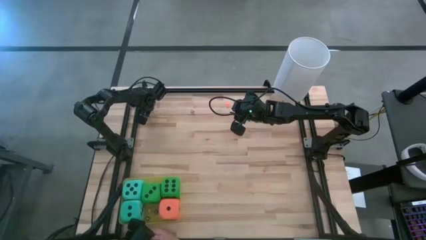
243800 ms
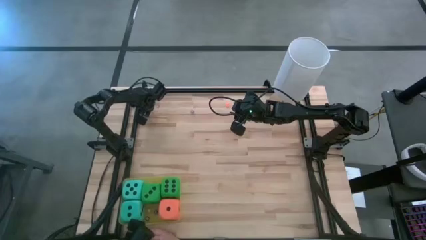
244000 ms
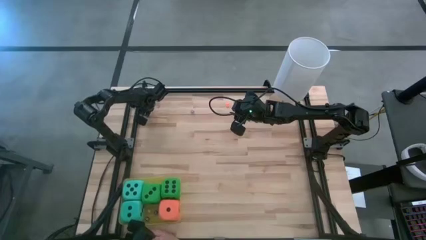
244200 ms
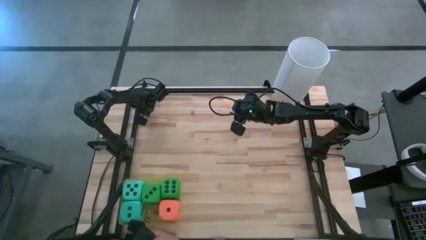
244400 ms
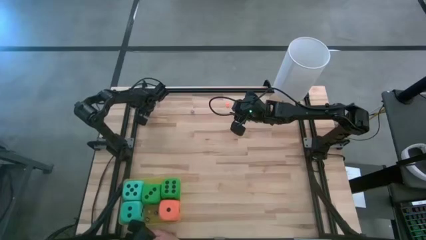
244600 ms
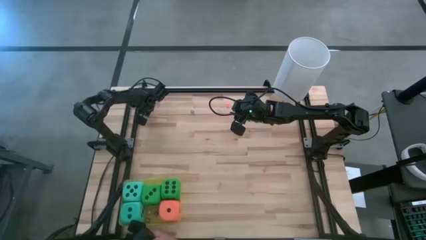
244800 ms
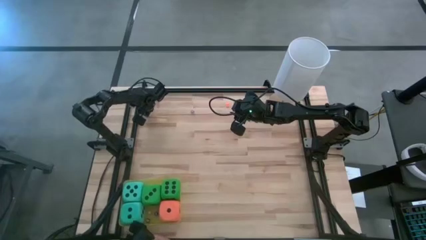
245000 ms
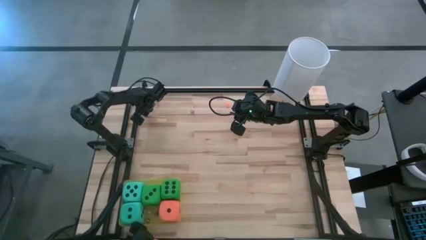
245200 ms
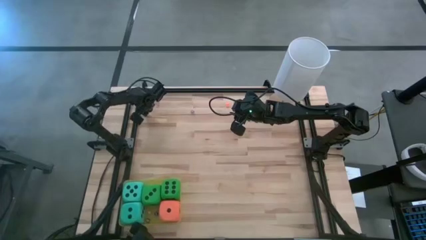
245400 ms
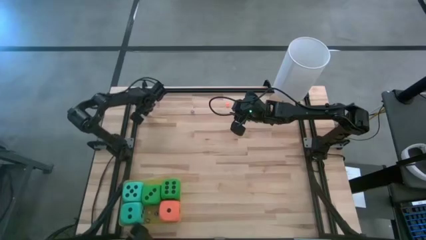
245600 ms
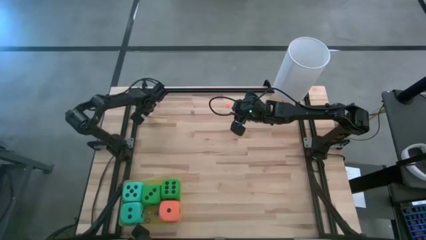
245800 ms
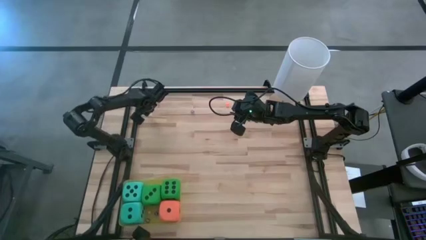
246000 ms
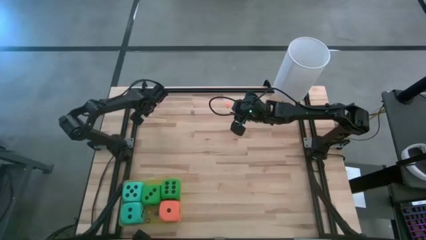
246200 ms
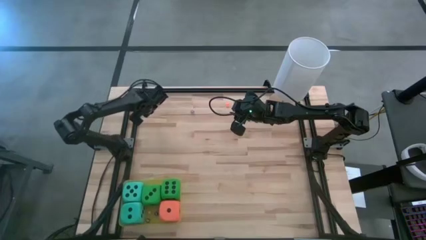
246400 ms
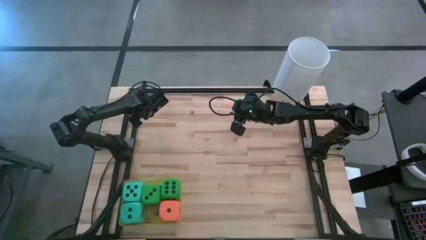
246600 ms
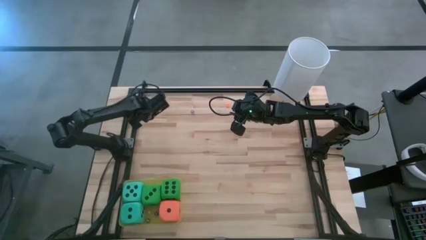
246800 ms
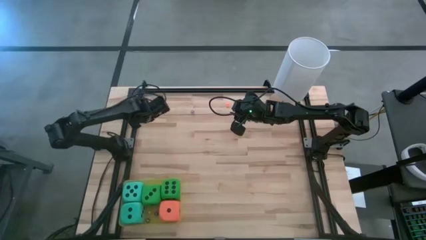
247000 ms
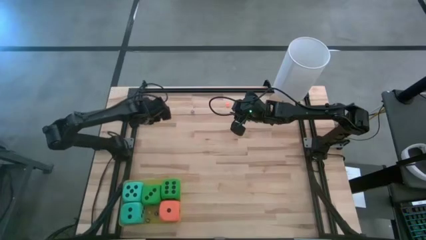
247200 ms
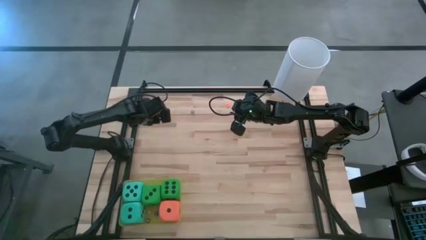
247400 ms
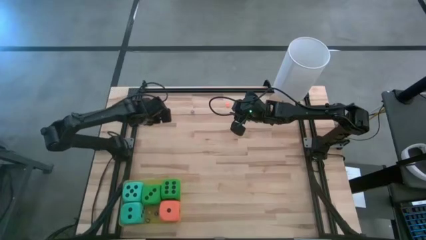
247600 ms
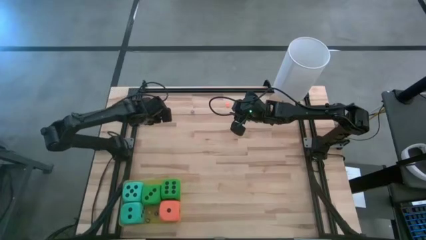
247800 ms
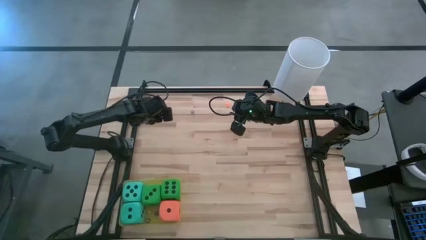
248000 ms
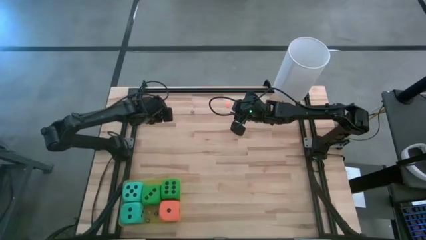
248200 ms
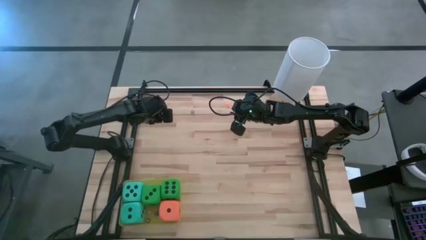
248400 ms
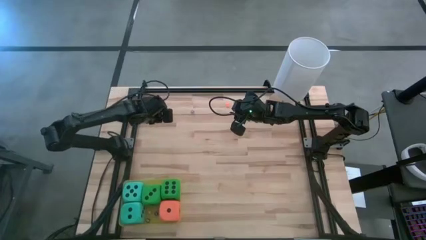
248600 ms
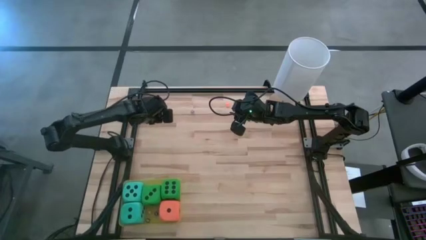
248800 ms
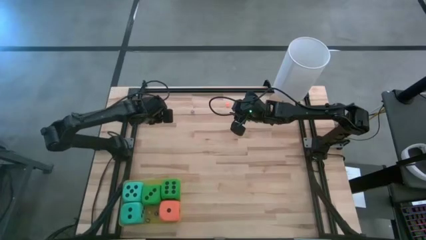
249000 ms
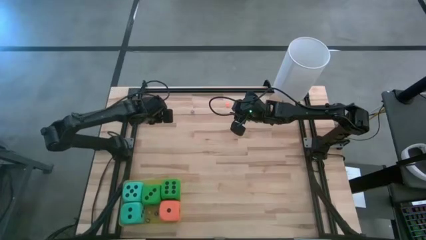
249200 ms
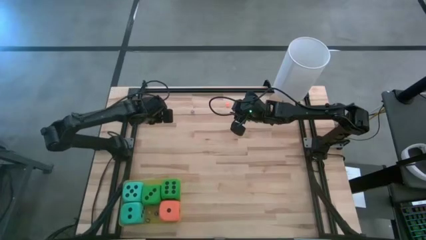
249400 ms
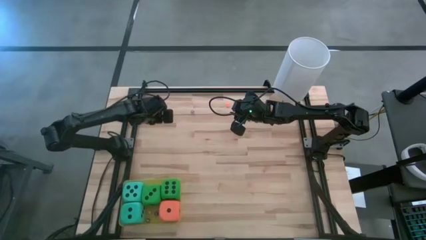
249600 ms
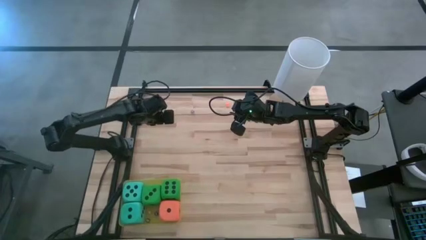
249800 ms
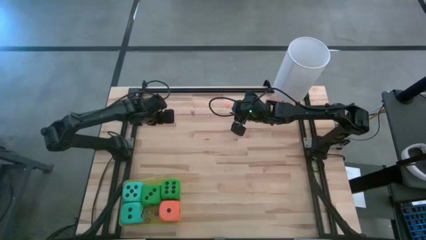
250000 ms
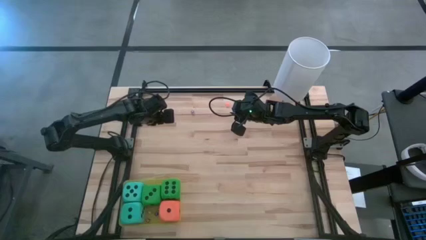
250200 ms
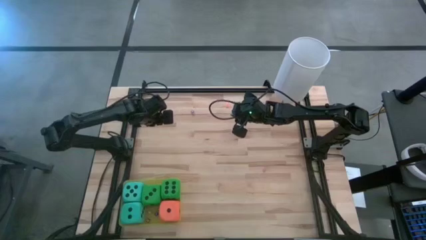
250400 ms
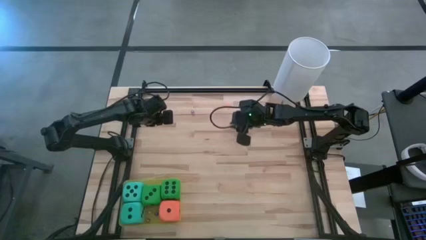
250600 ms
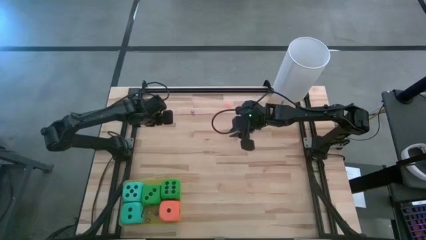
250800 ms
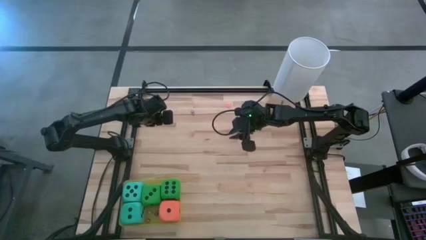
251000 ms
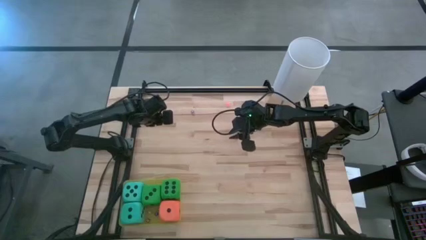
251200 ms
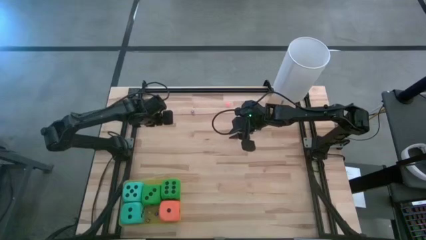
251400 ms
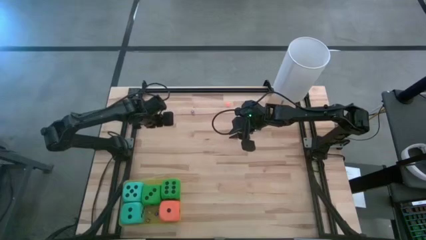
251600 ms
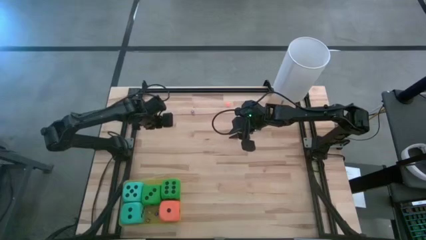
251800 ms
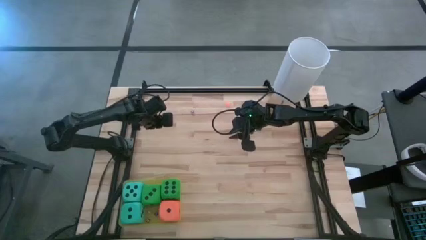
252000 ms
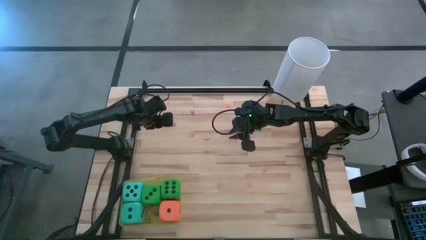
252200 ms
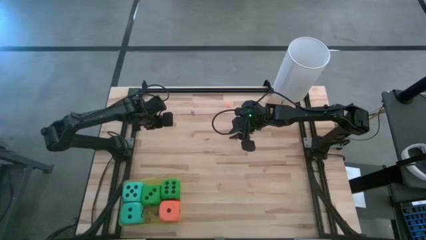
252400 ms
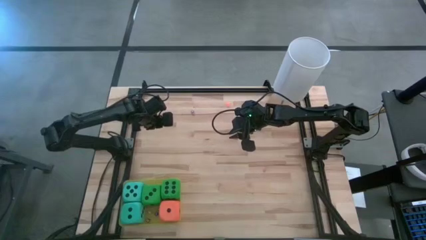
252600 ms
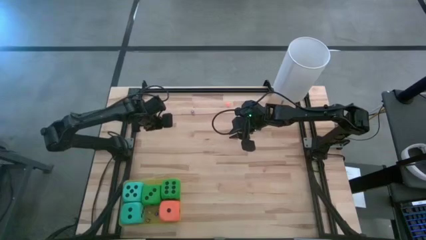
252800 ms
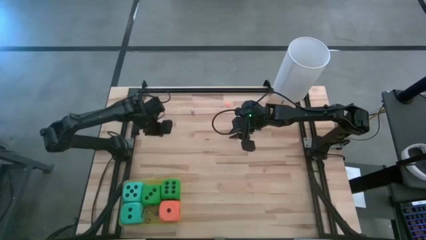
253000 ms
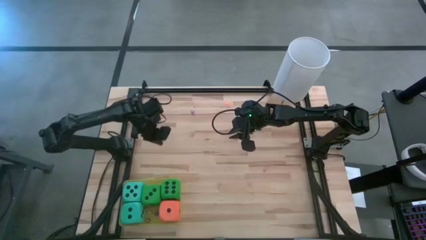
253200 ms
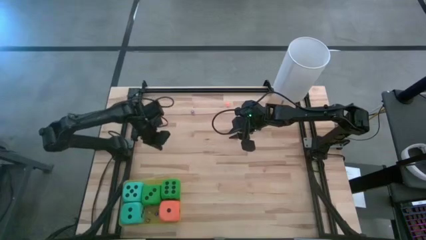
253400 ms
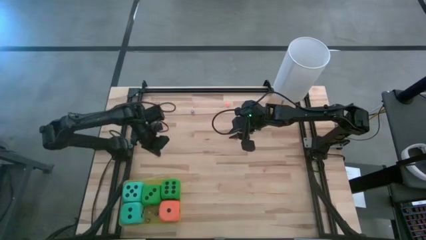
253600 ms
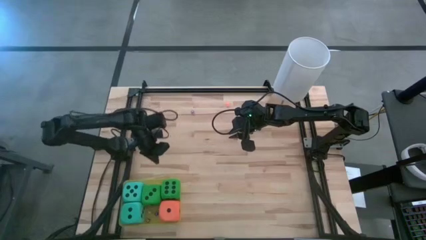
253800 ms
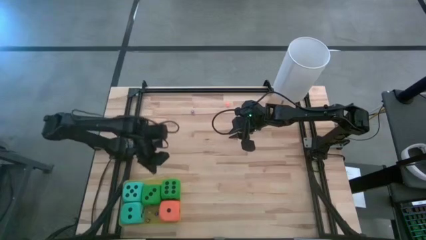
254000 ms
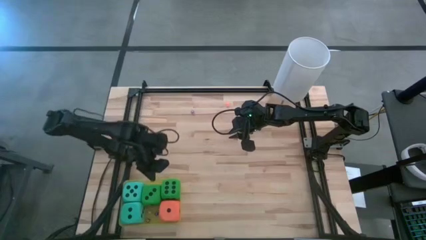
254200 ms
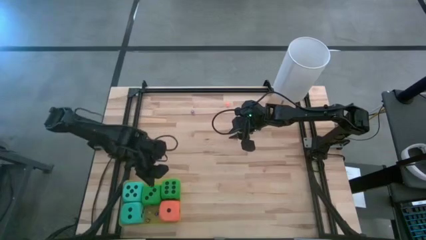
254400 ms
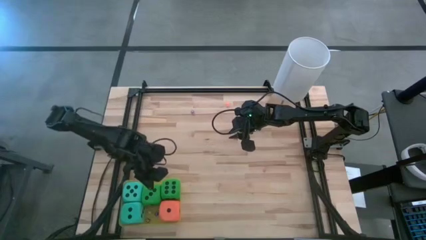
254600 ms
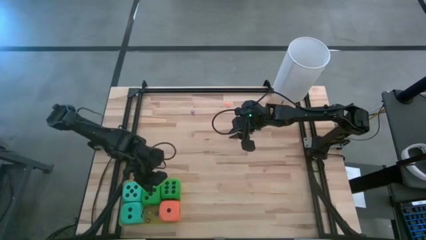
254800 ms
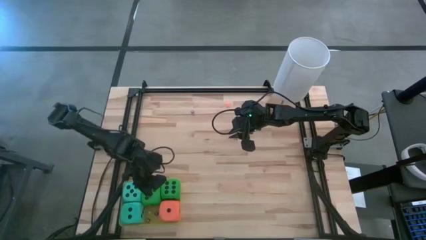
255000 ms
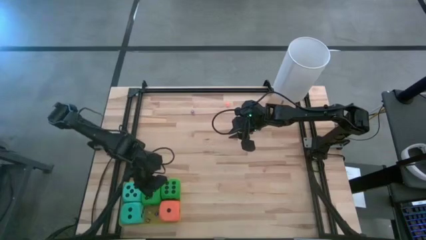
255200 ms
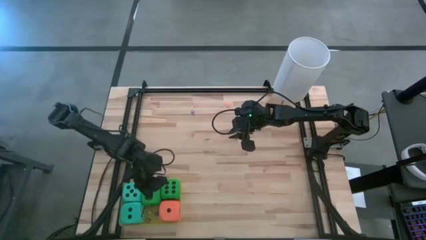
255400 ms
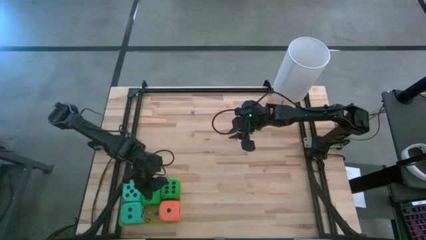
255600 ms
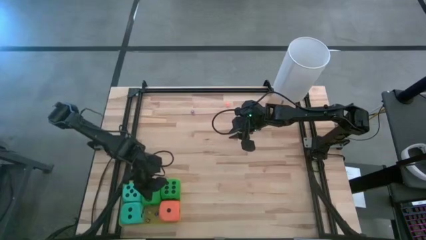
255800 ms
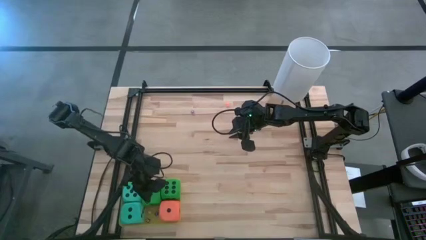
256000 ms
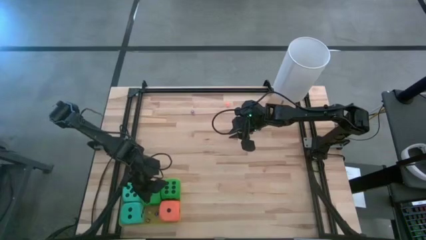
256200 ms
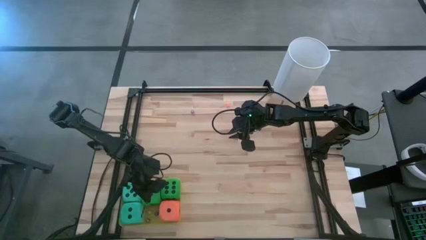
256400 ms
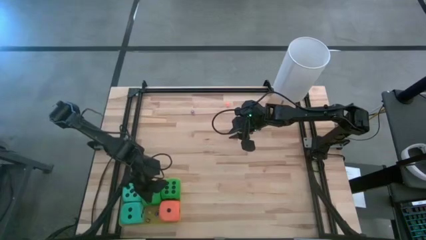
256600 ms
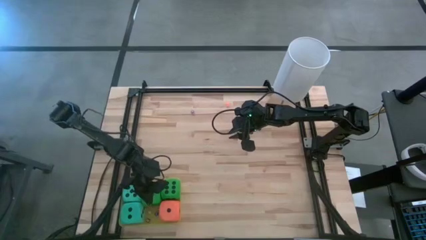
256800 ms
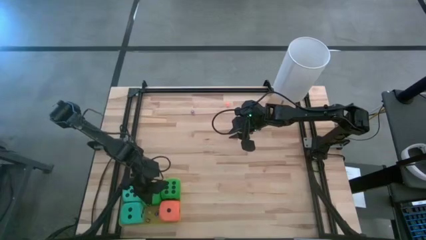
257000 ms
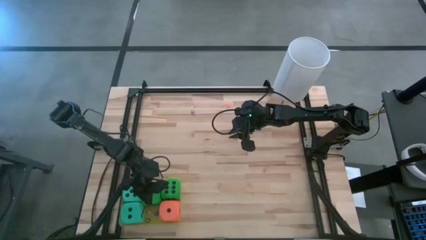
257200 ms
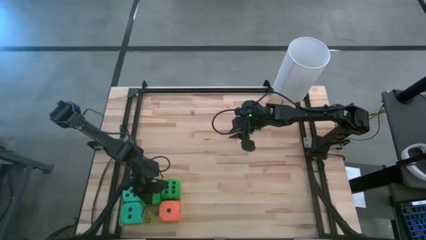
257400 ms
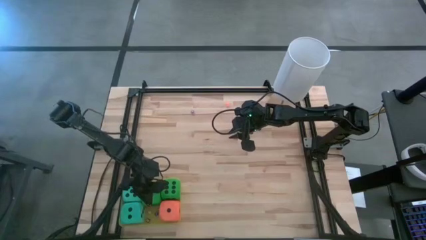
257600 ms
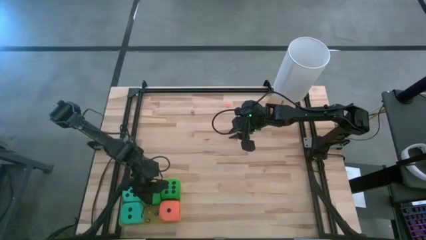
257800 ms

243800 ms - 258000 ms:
Task: Pick & Place Dice
Put the black dice into the yellow bin
